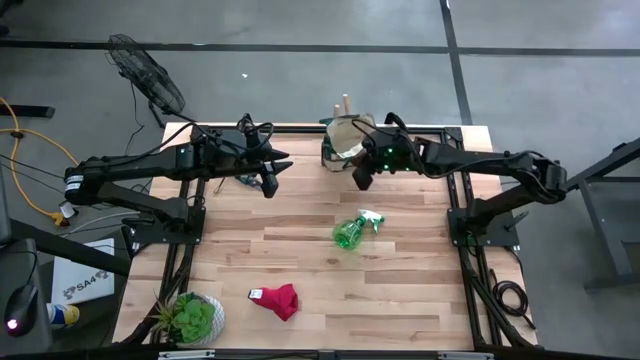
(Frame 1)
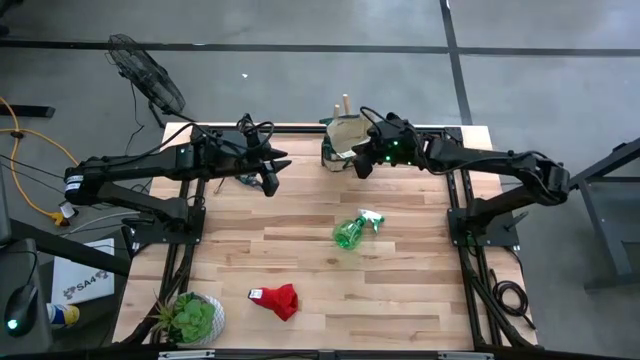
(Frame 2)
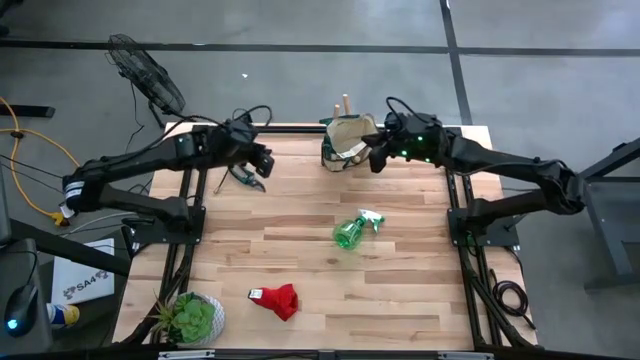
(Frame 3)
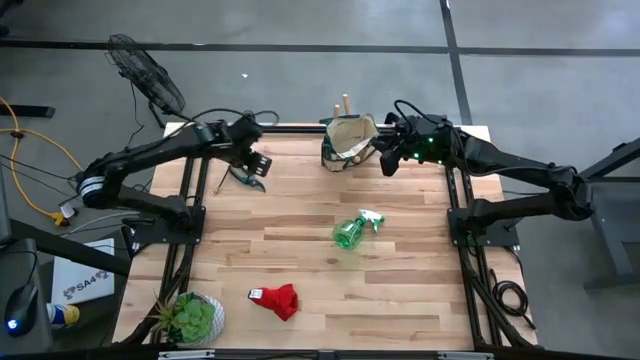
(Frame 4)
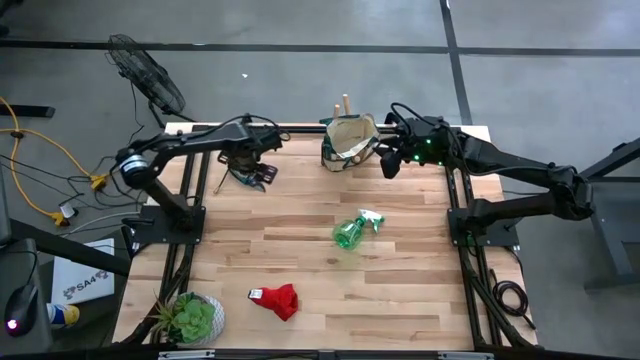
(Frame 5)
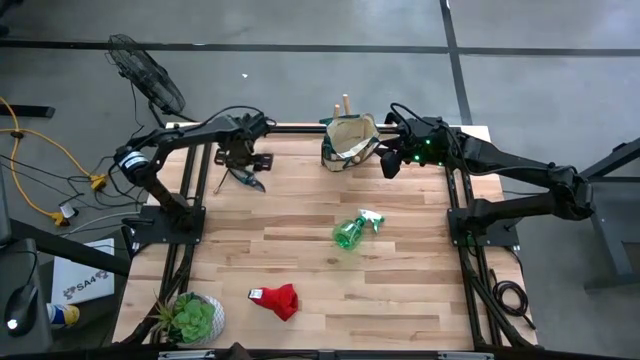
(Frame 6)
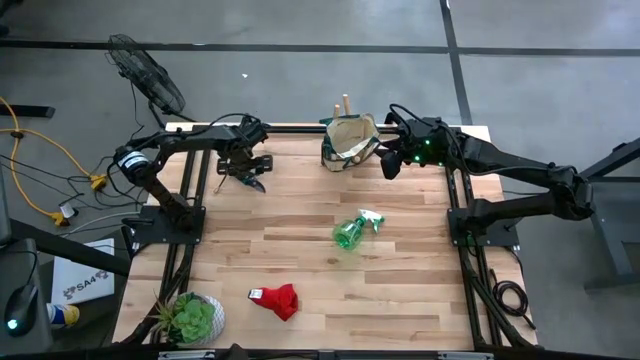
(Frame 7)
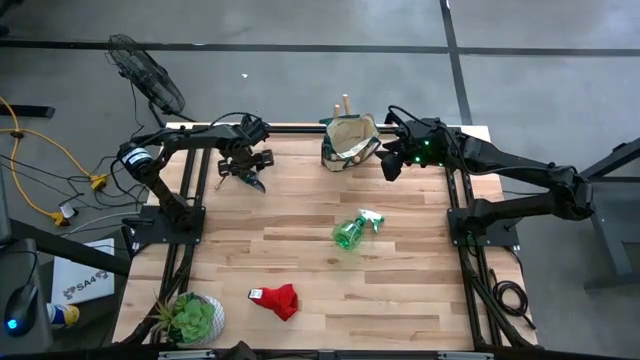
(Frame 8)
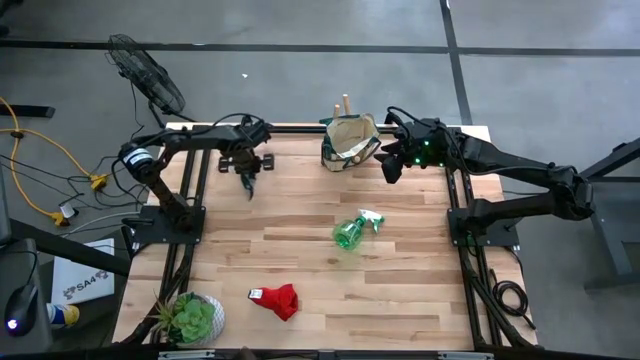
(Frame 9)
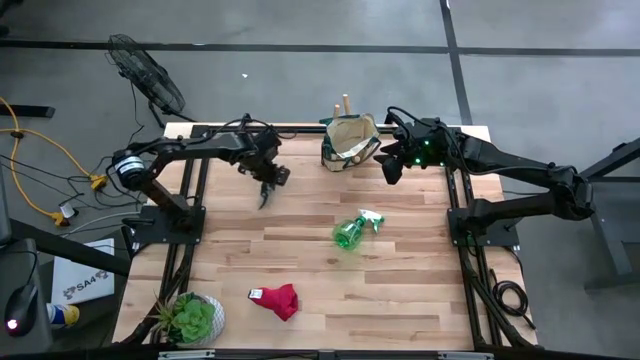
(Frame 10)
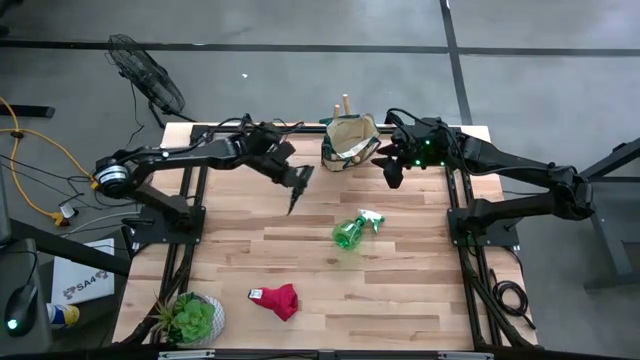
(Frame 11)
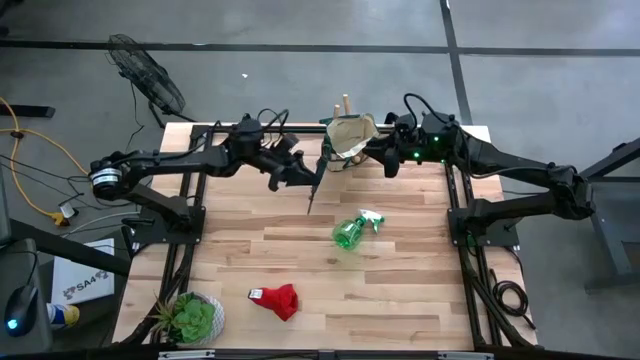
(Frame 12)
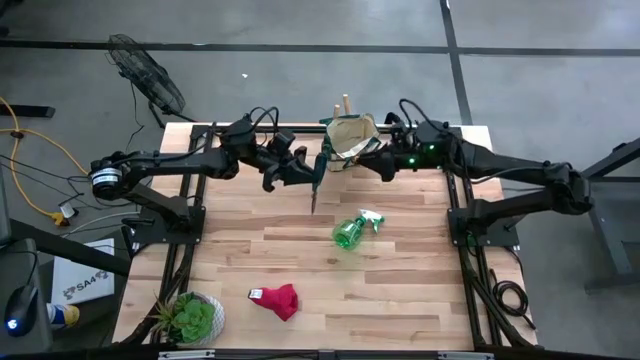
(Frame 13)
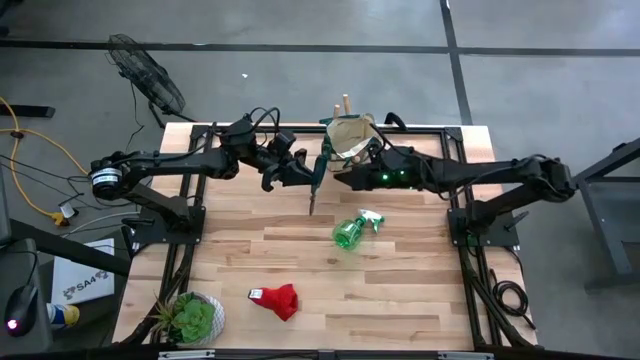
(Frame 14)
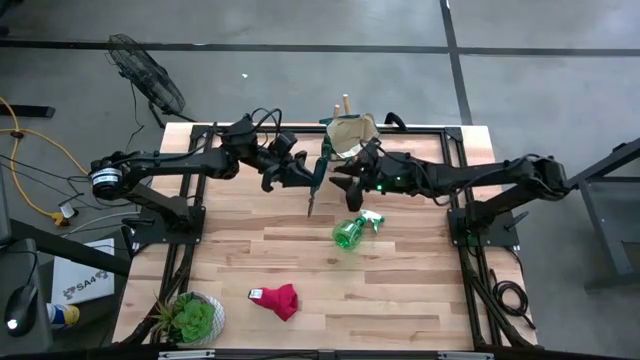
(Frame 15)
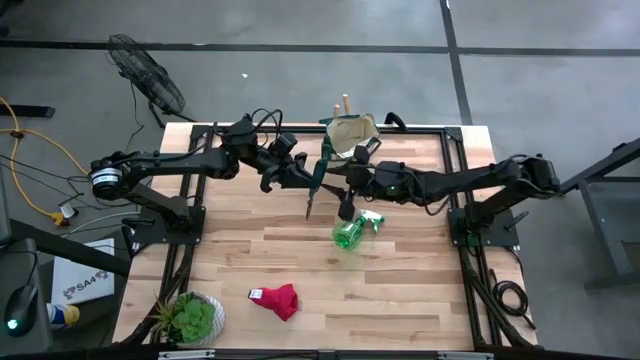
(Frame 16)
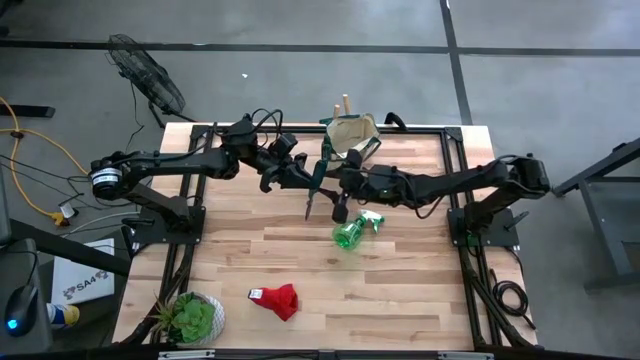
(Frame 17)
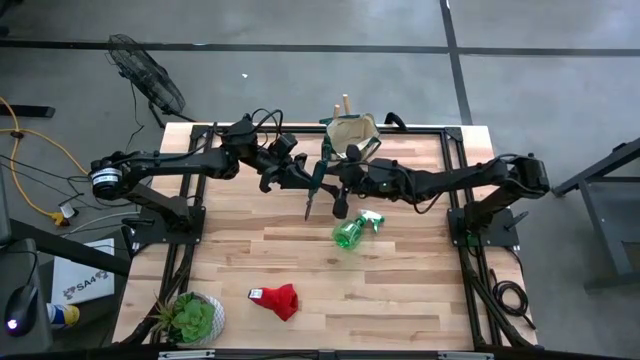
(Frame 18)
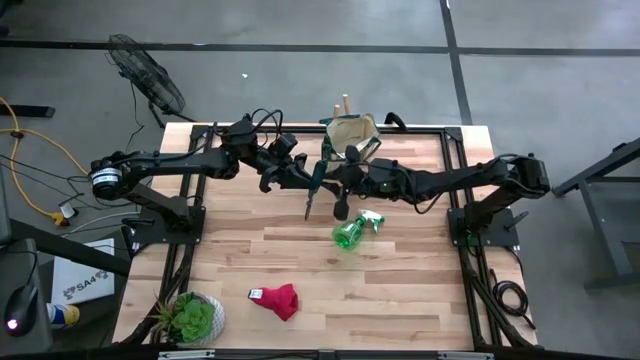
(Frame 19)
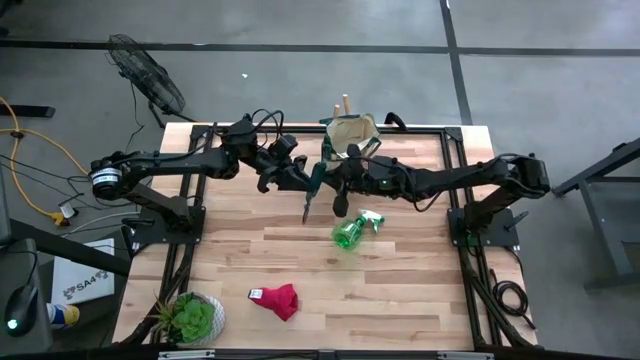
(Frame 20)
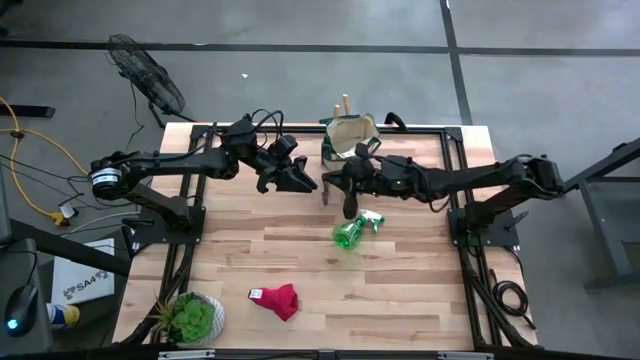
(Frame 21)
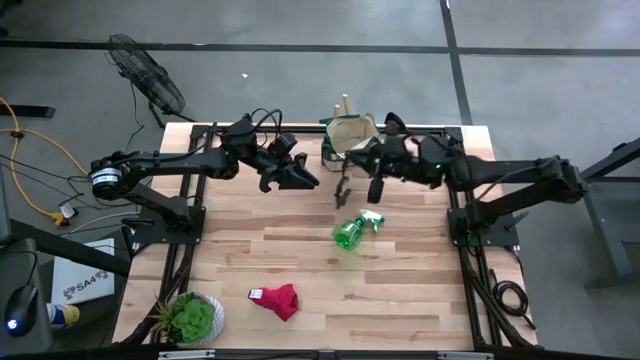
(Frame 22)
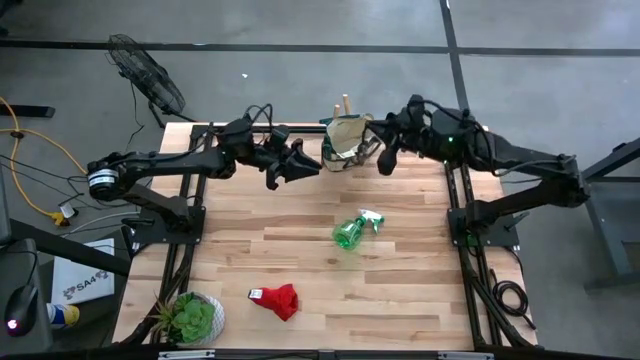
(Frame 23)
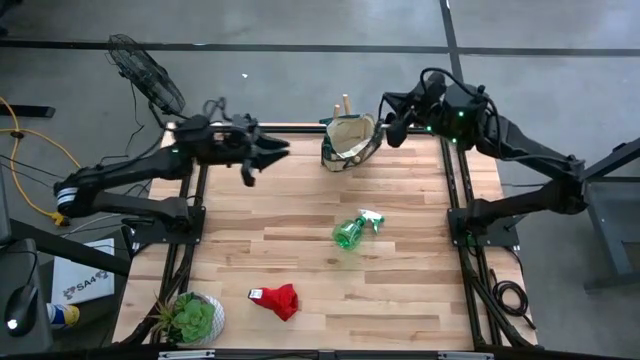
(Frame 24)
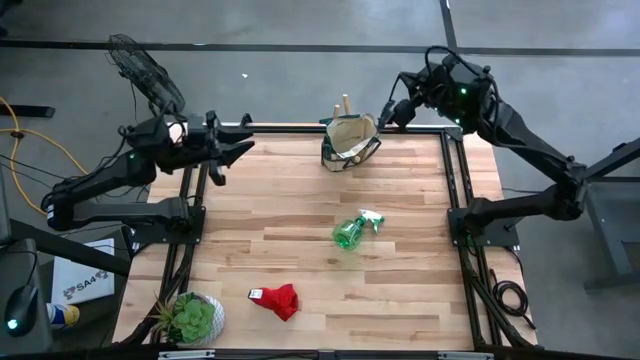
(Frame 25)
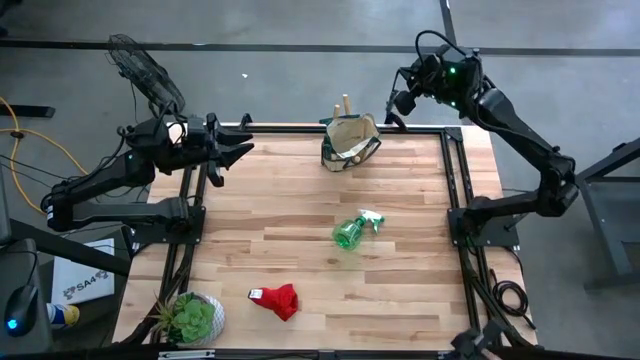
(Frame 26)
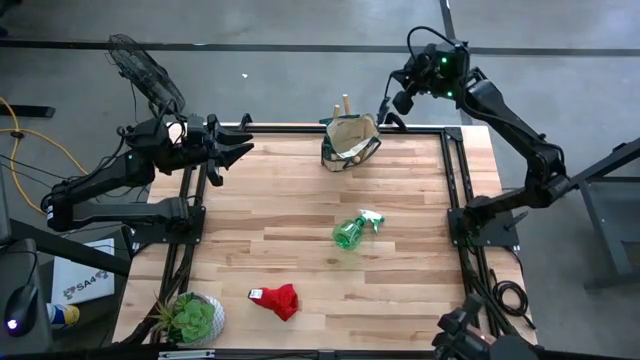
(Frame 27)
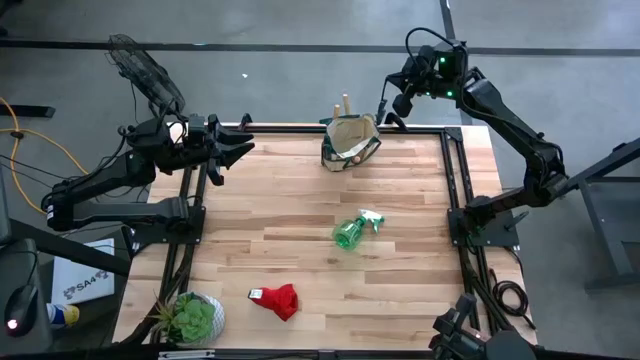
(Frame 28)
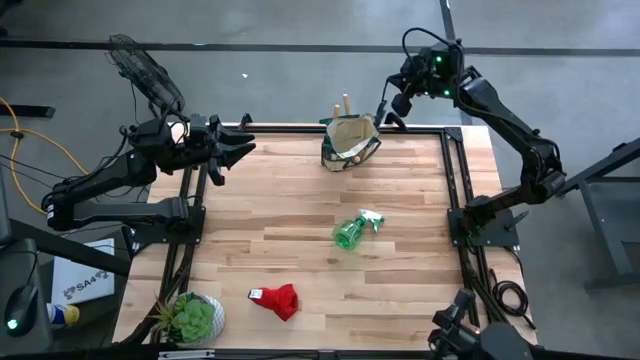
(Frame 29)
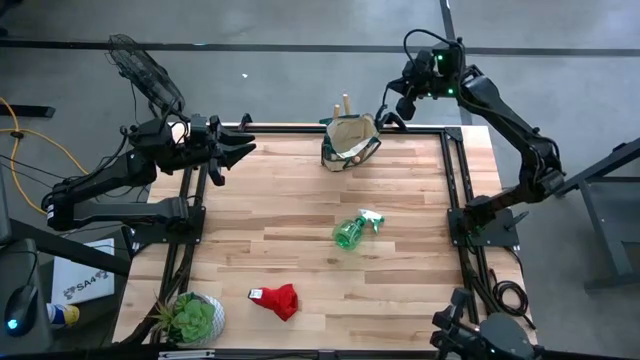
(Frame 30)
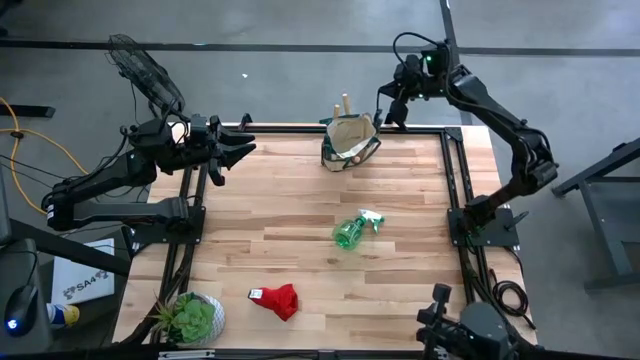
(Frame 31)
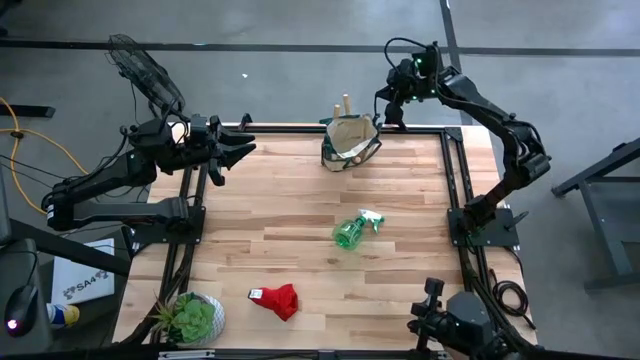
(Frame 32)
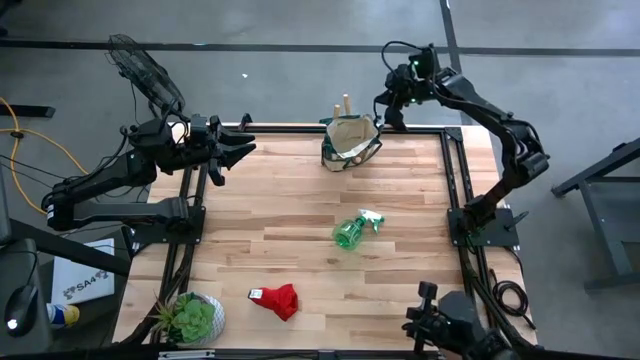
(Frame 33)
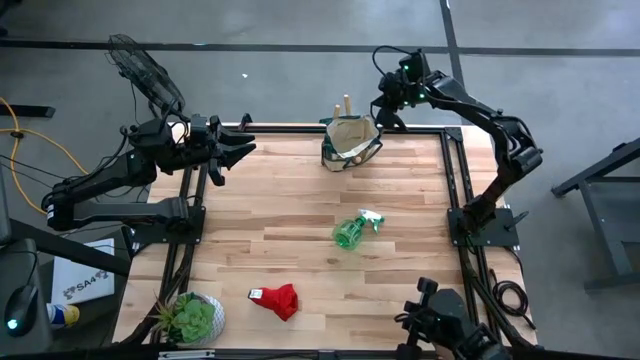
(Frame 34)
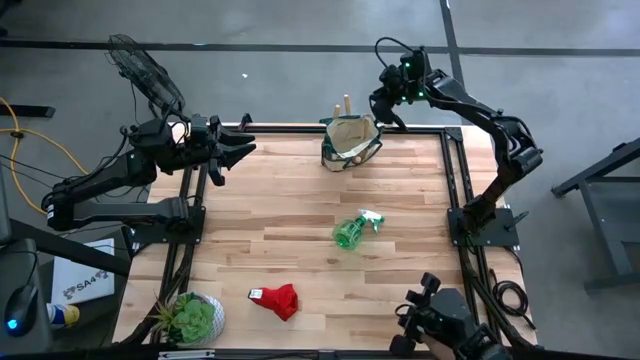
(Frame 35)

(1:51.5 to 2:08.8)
Task: Pick & Place Garden tools in Gardening bag
Put the shear scissors into the gardening bag

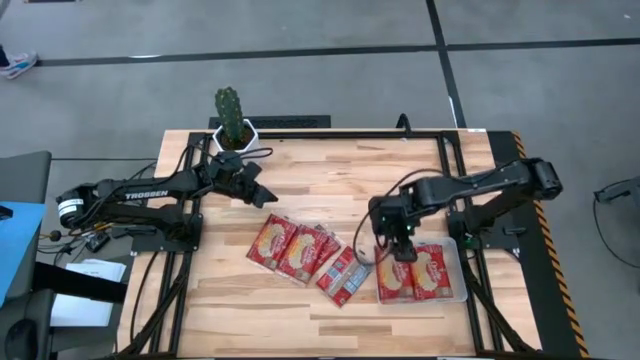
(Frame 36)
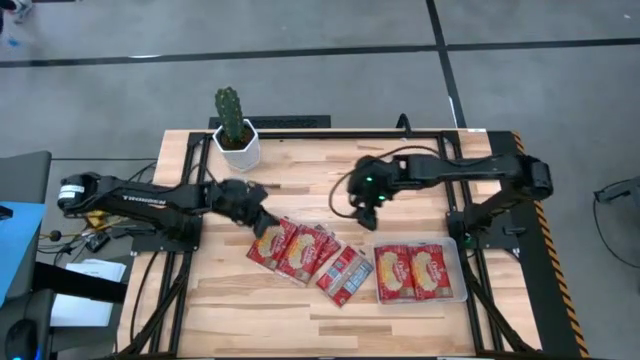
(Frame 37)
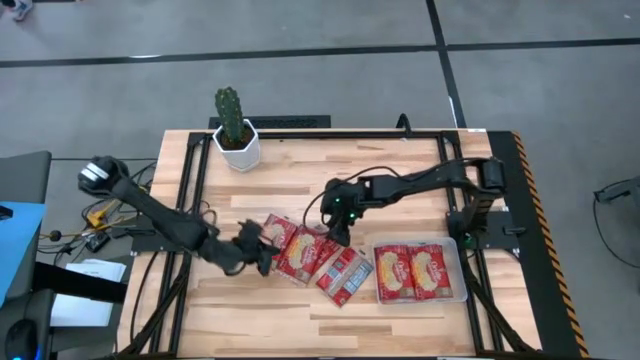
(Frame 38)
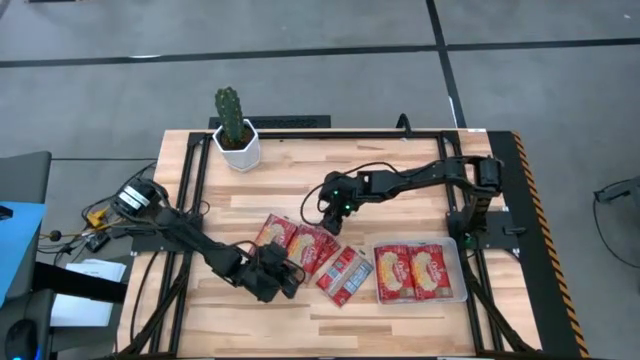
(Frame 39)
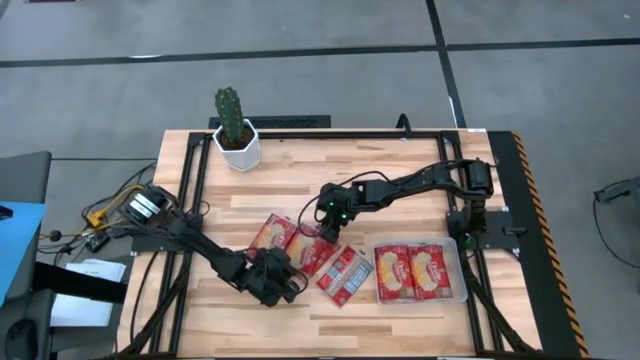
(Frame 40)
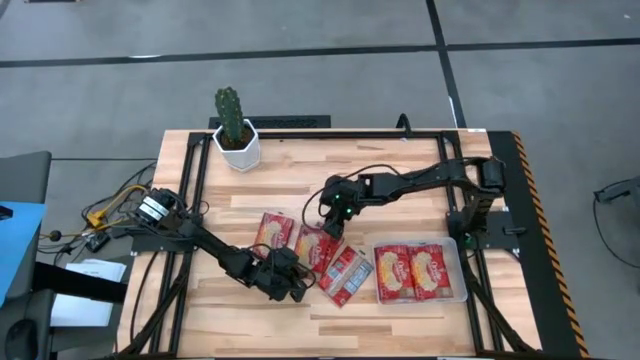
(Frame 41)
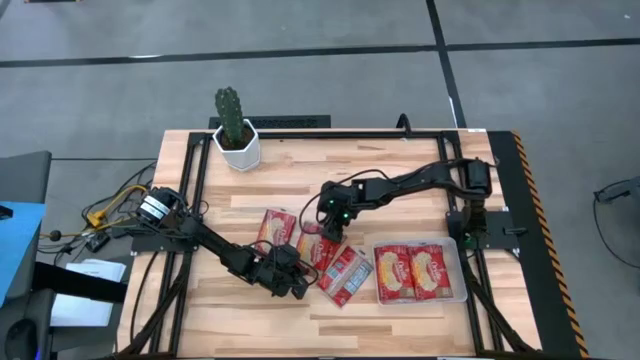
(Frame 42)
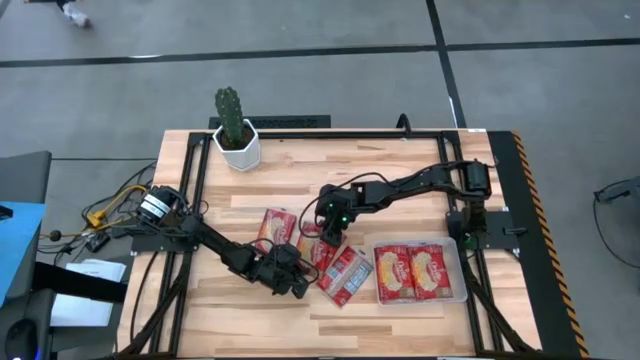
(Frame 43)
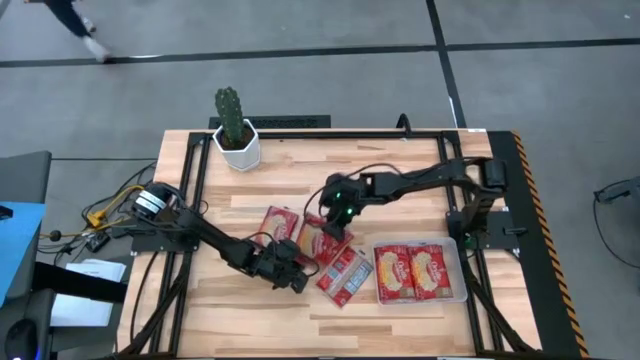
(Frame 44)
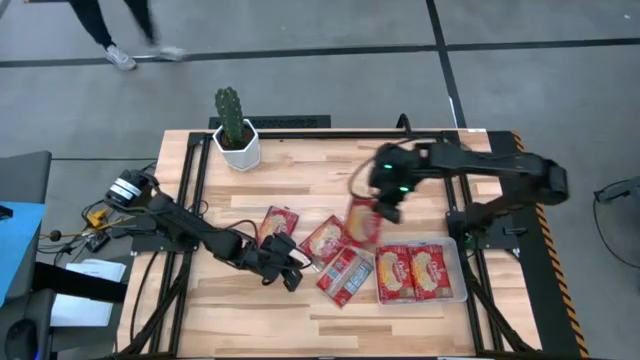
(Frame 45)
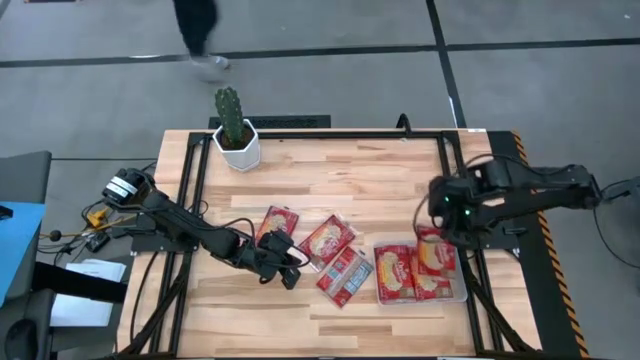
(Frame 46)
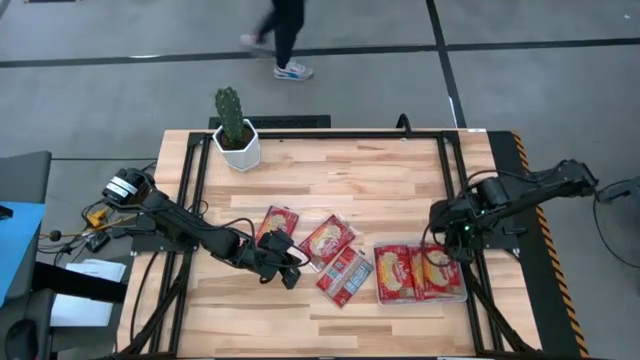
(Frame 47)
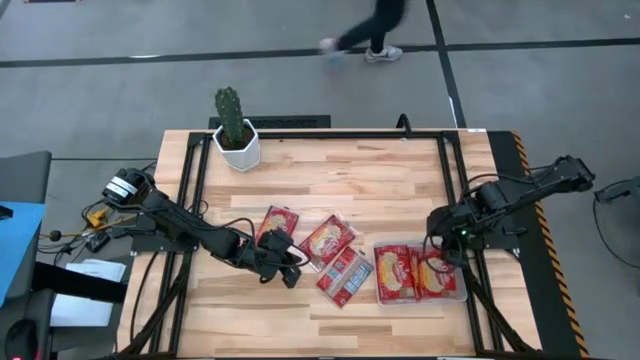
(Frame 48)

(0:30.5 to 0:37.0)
Task: Sort popcorn bags into baskets
Put the popcorn bag into the transparent bin
